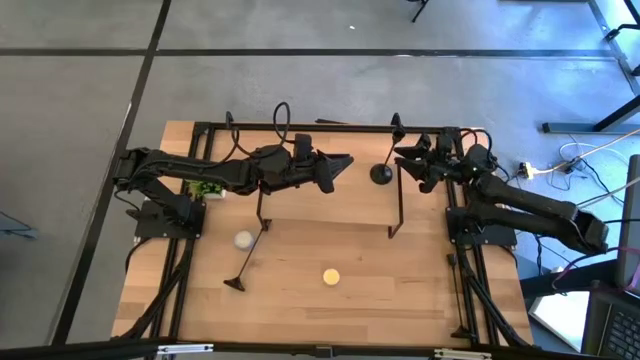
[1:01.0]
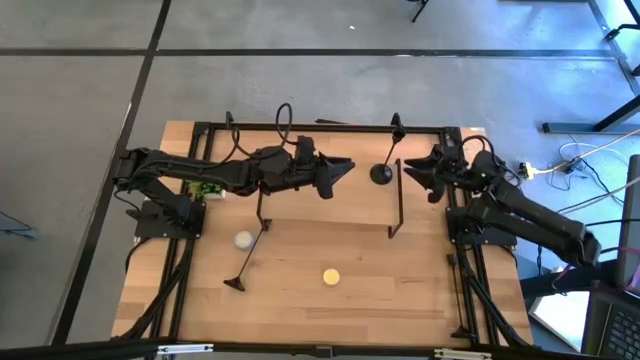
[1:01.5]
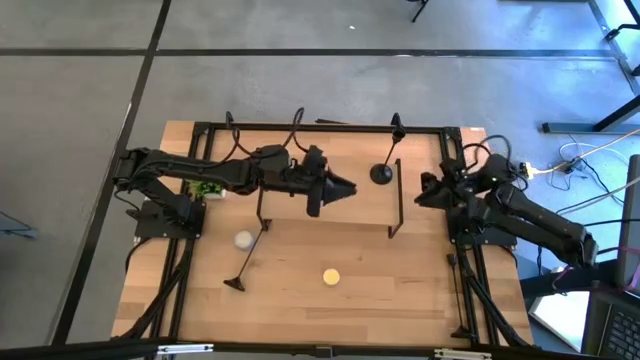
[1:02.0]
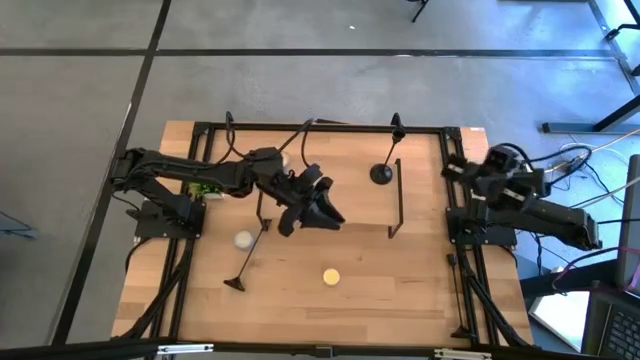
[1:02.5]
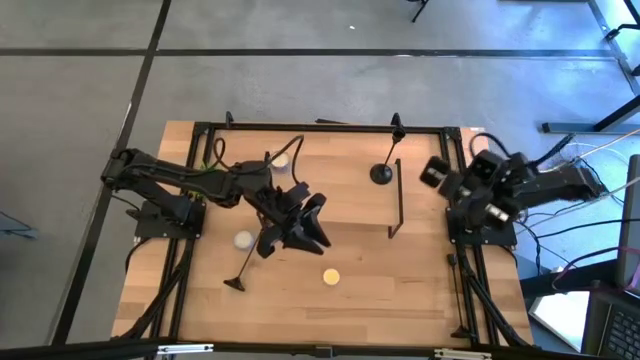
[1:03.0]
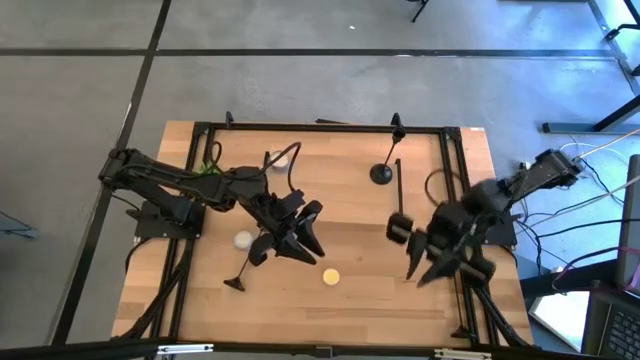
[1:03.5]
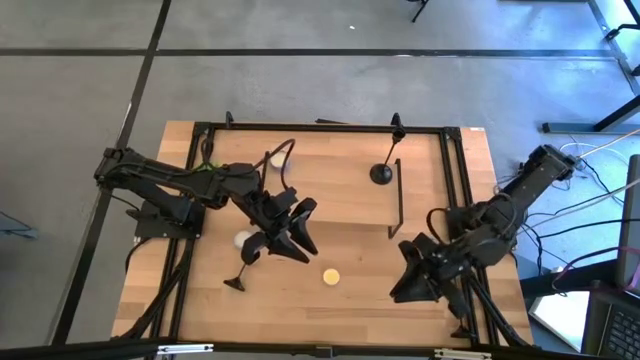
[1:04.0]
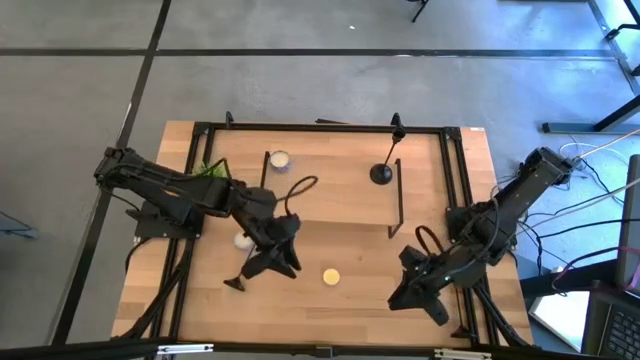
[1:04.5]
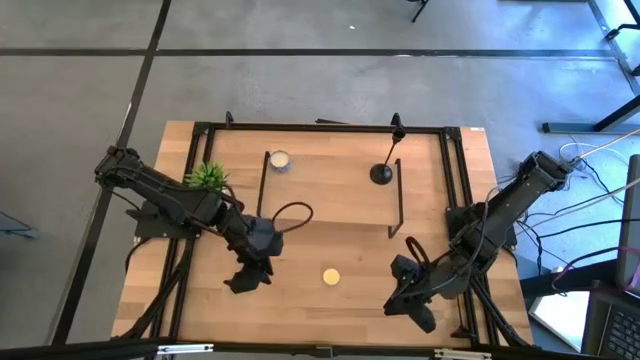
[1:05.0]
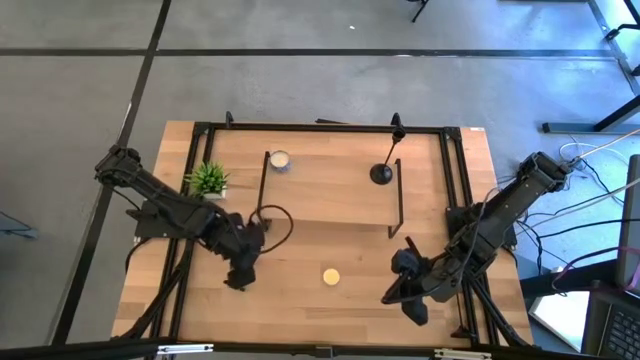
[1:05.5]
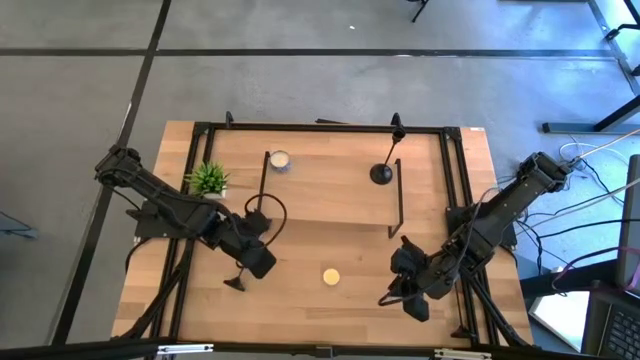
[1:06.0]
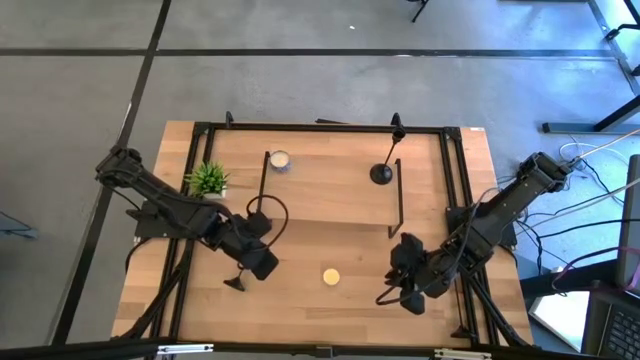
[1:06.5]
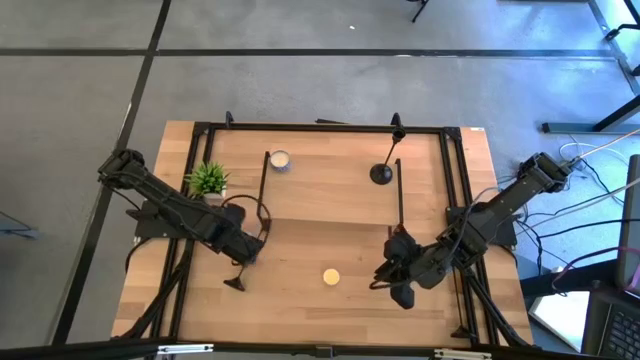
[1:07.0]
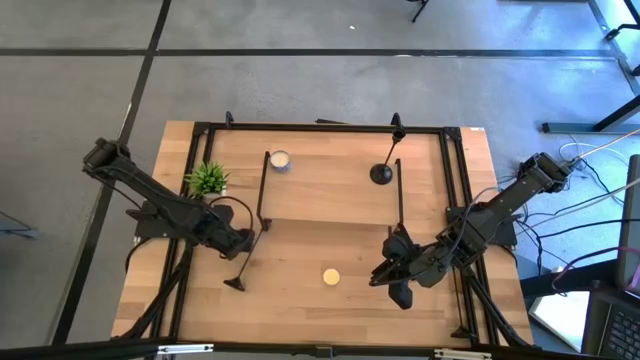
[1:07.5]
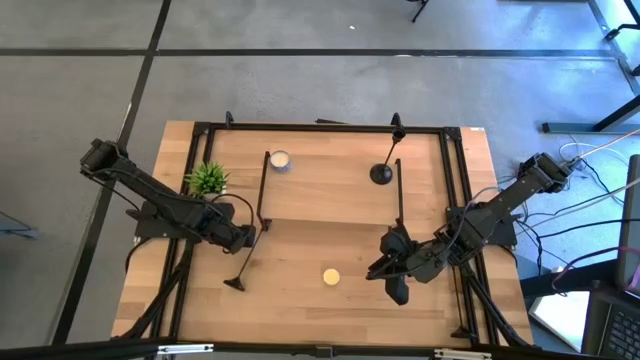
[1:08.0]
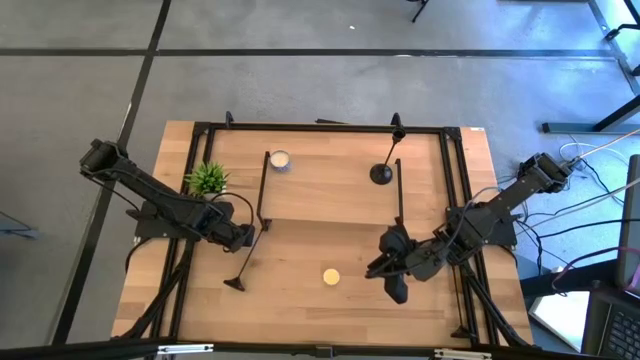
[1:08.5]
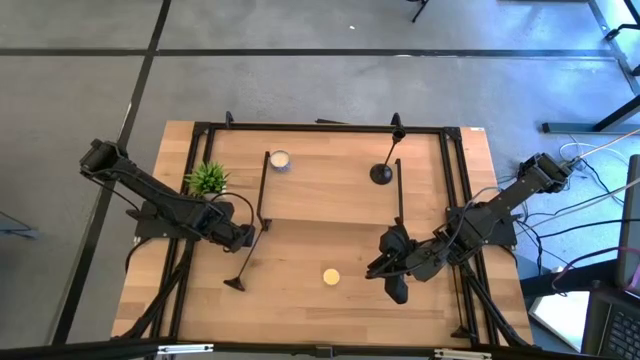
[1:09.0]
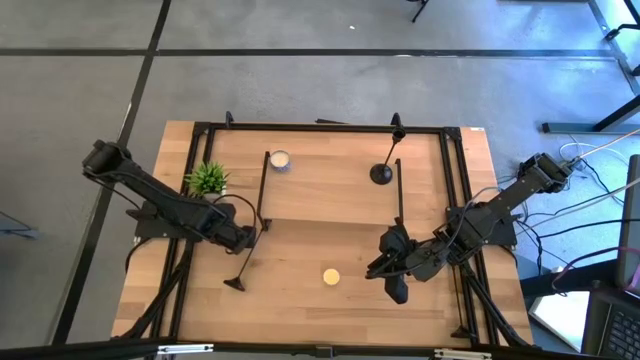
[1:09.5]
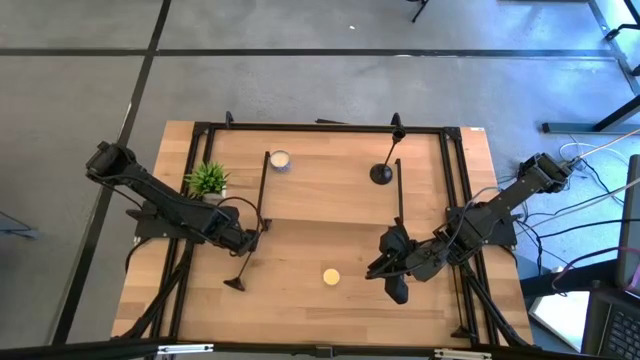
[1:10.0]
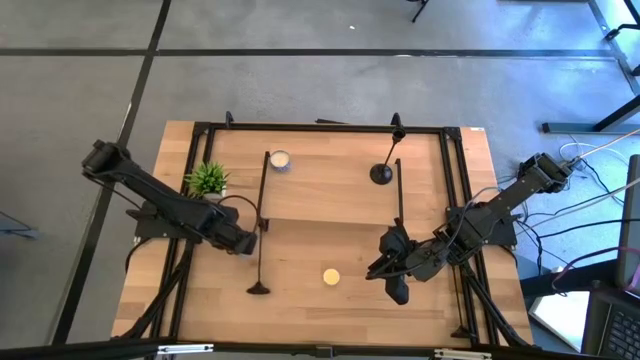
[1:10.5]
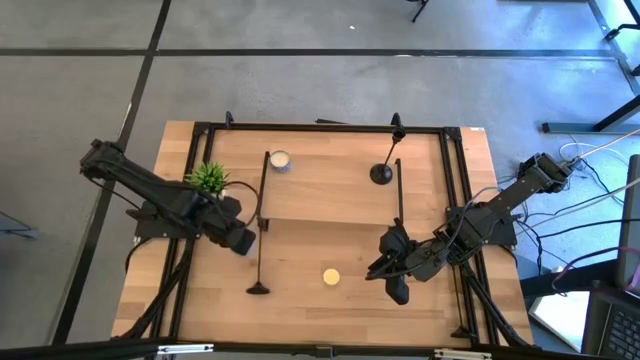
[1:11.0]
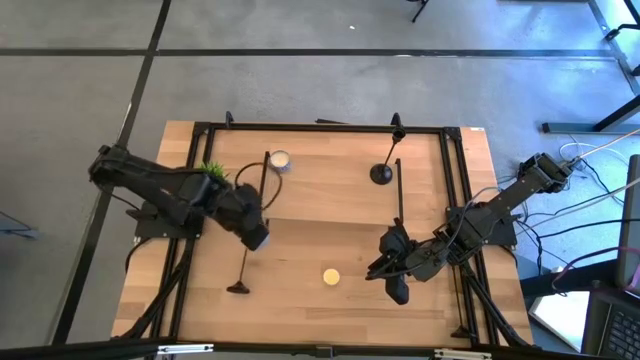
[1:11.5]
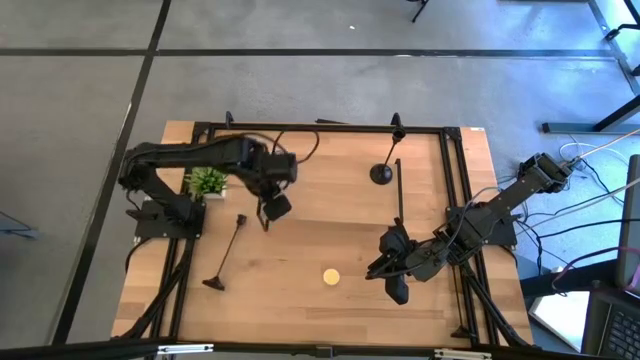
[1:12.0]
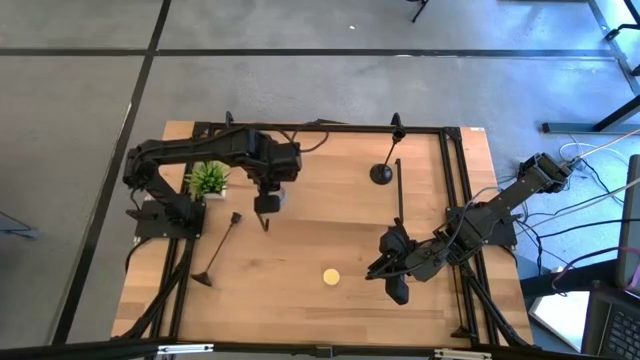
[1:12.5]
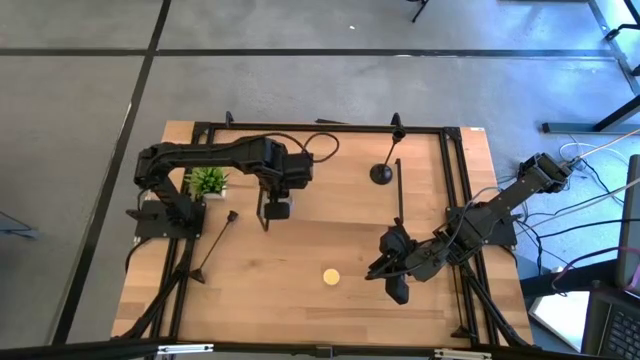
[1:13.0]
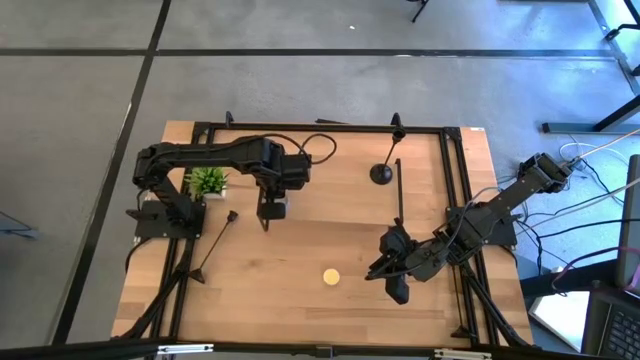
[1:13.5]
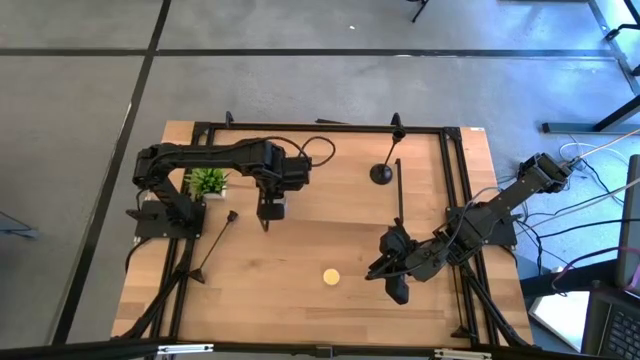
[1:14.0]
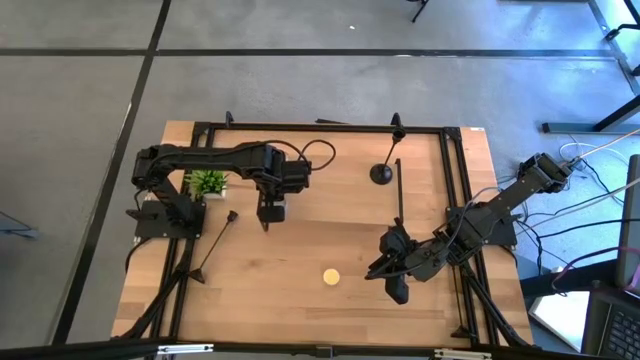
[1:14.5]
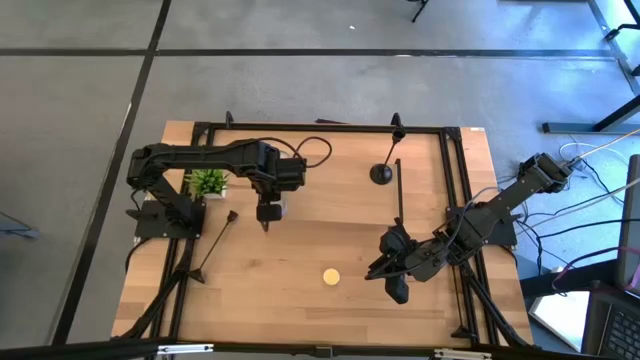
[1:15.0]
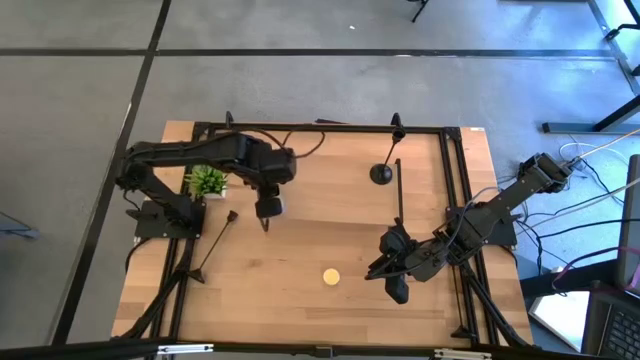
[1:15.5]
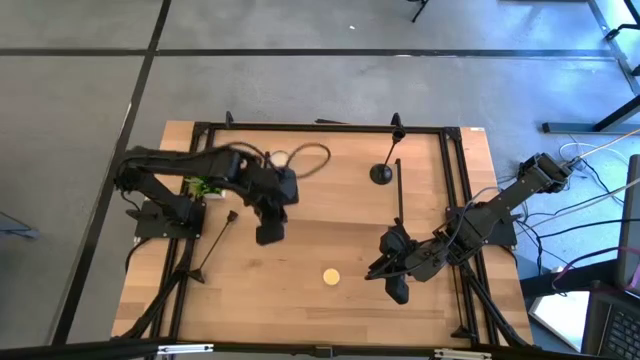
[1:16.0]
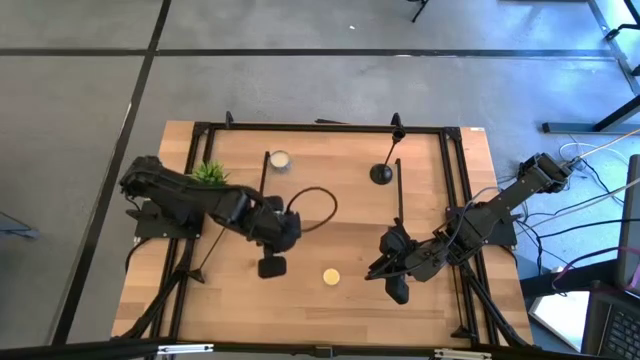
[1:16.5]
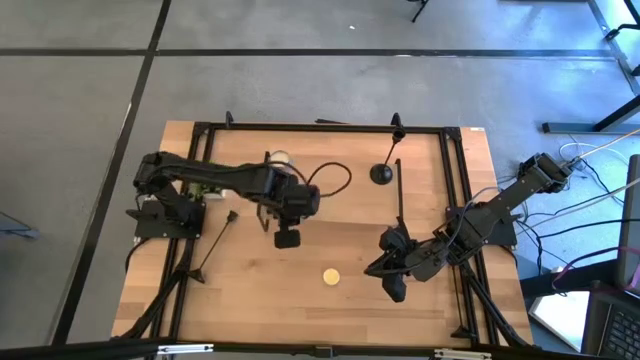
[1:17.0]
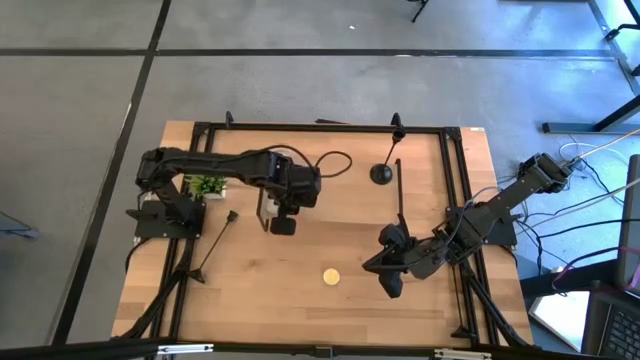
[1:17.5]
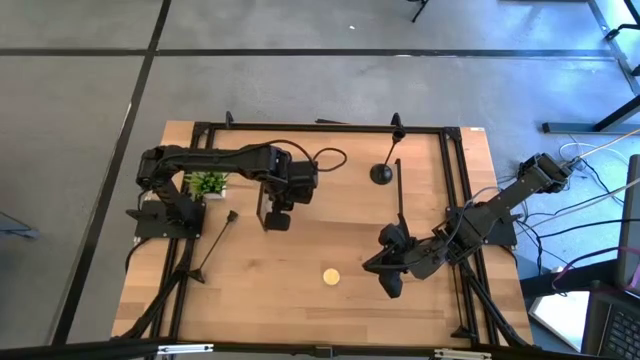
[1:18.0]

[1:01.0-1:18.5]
Task: Pick & Place candle stick holders
Put the blue scented candle on the shelf
